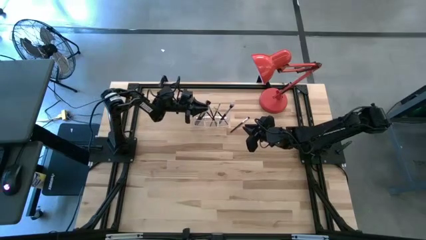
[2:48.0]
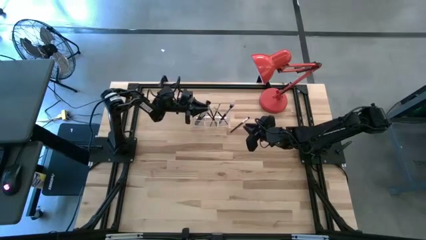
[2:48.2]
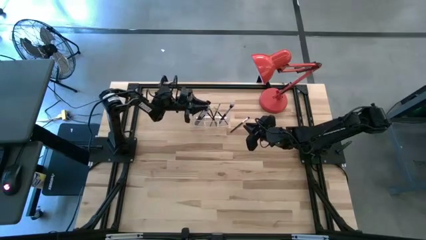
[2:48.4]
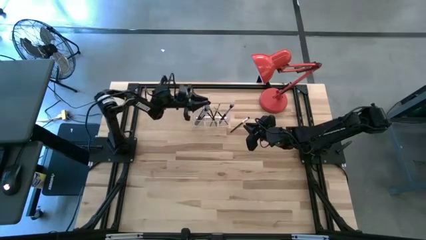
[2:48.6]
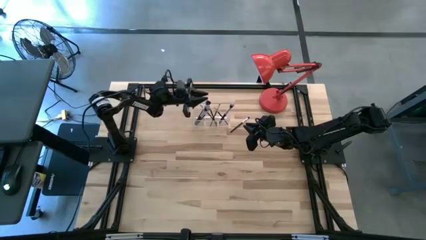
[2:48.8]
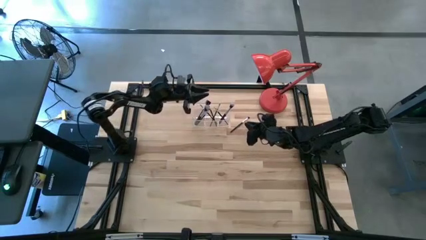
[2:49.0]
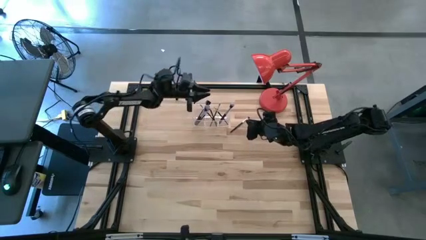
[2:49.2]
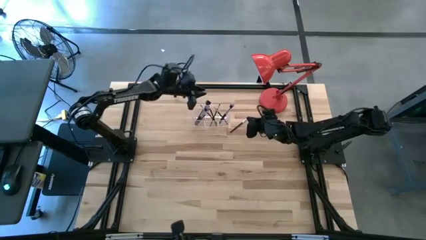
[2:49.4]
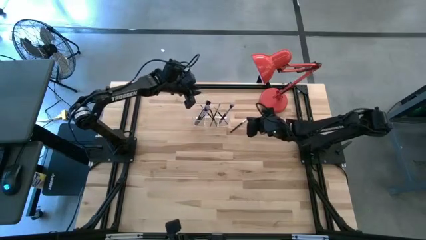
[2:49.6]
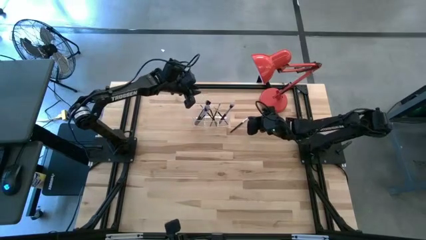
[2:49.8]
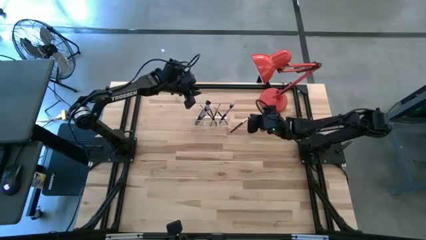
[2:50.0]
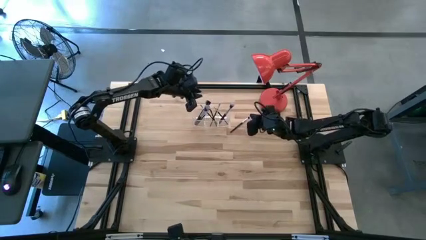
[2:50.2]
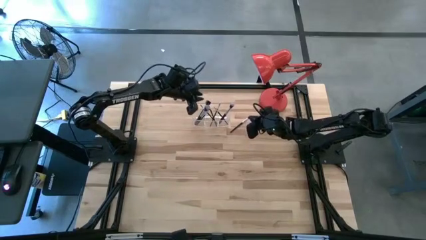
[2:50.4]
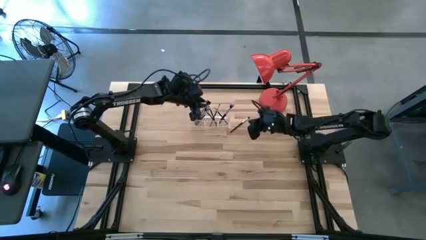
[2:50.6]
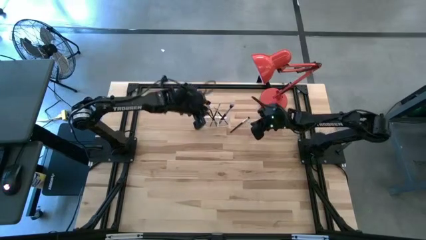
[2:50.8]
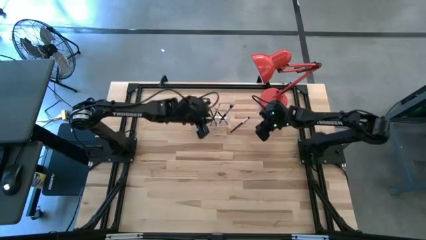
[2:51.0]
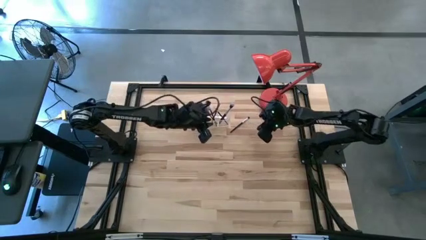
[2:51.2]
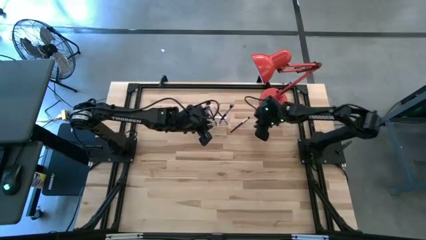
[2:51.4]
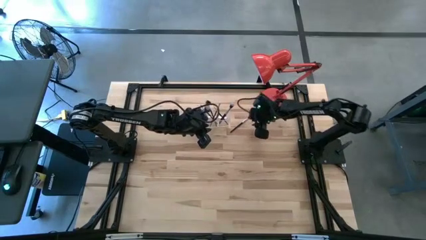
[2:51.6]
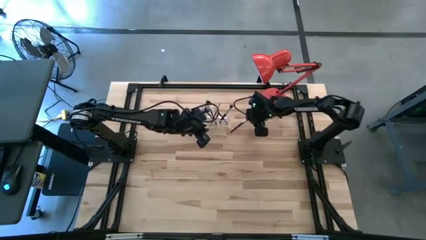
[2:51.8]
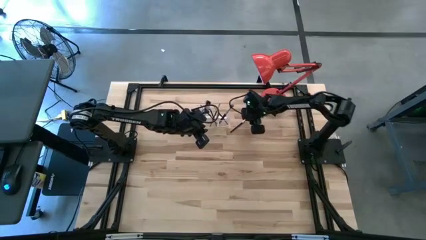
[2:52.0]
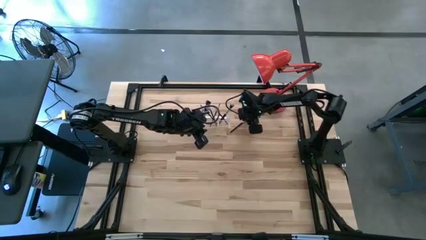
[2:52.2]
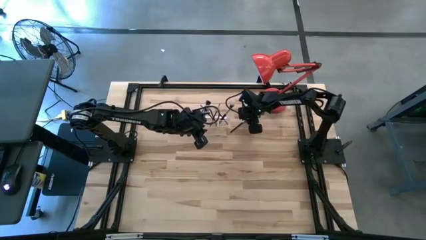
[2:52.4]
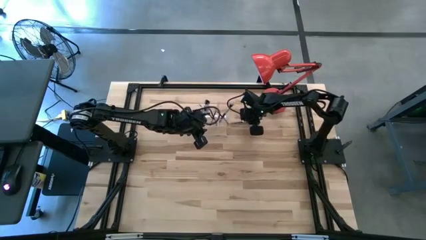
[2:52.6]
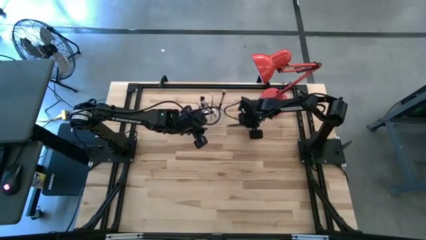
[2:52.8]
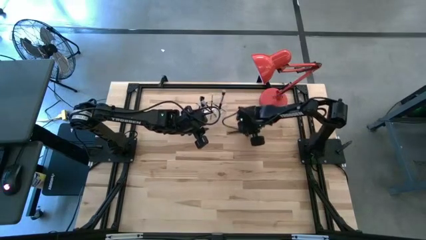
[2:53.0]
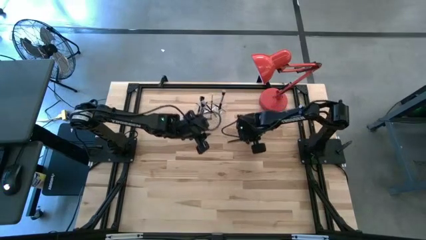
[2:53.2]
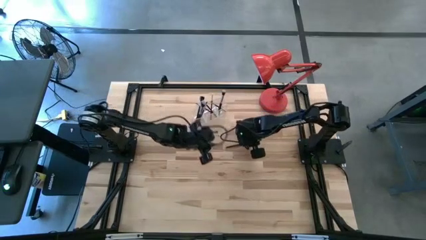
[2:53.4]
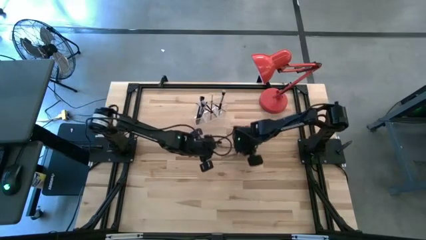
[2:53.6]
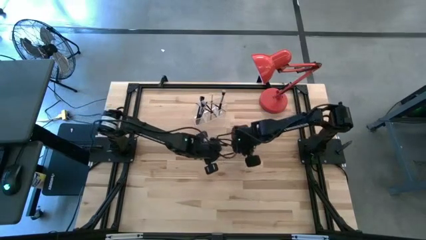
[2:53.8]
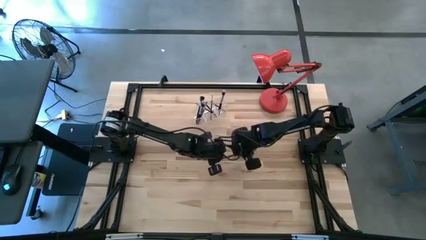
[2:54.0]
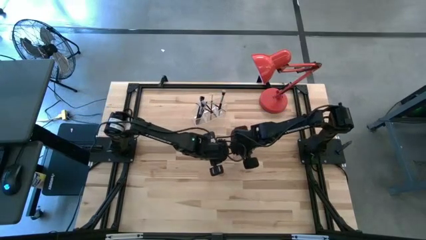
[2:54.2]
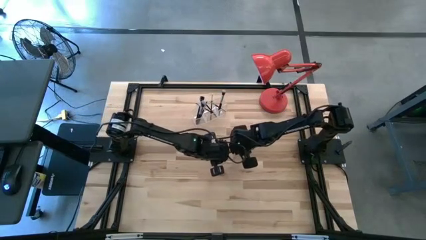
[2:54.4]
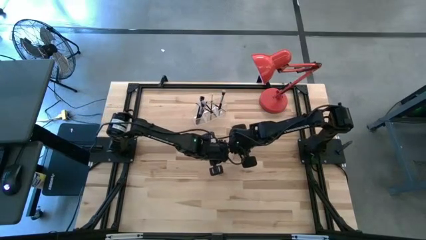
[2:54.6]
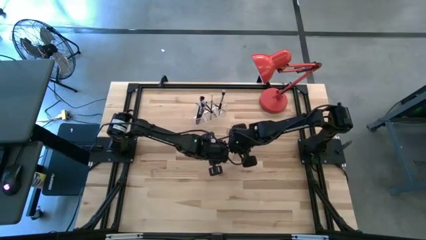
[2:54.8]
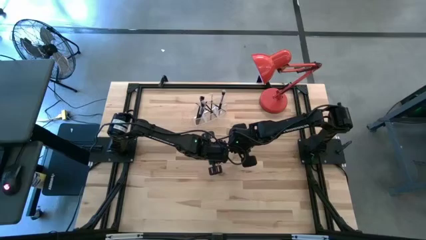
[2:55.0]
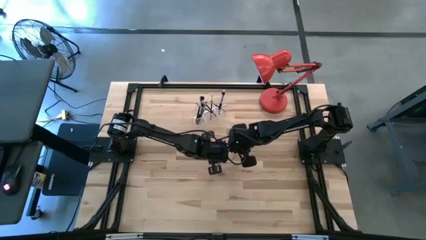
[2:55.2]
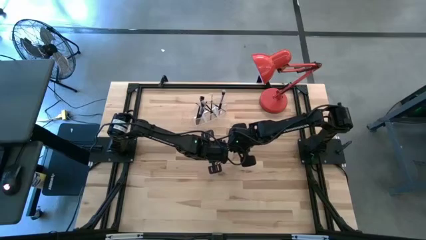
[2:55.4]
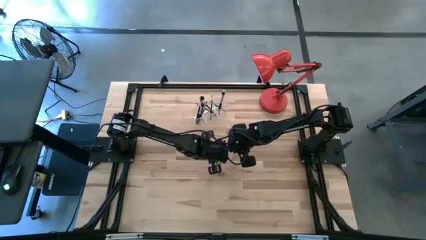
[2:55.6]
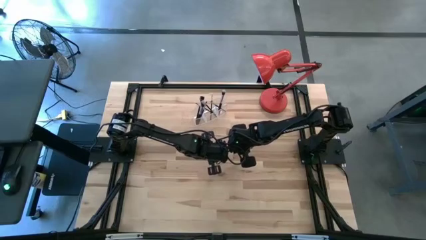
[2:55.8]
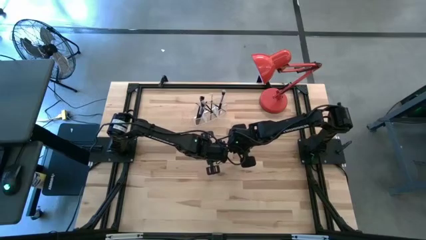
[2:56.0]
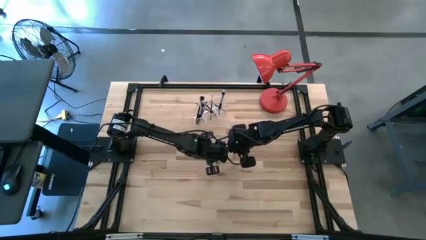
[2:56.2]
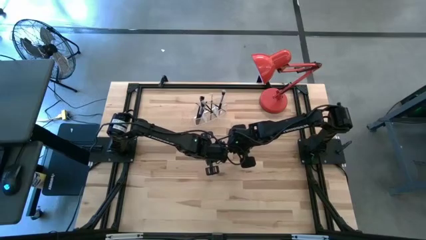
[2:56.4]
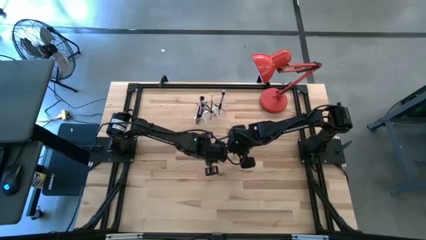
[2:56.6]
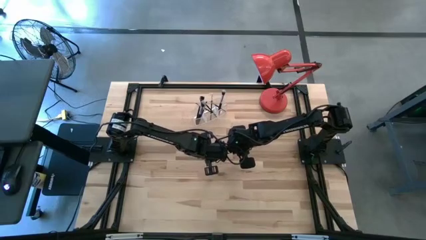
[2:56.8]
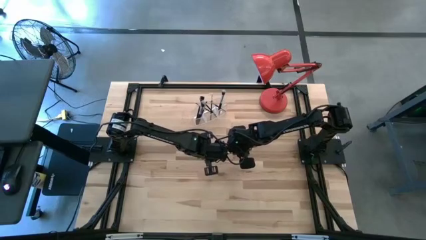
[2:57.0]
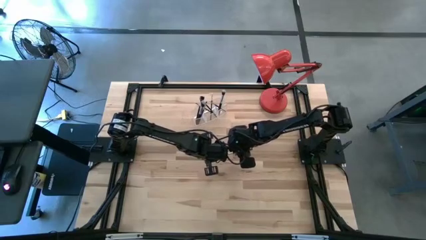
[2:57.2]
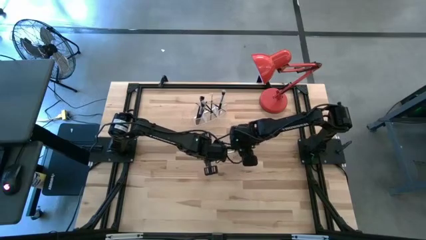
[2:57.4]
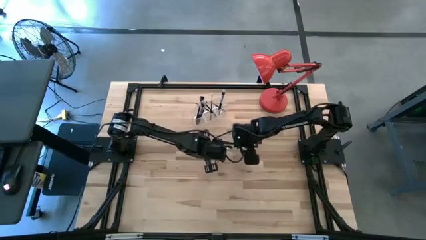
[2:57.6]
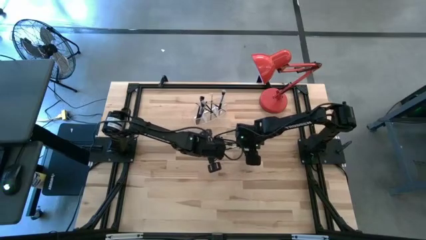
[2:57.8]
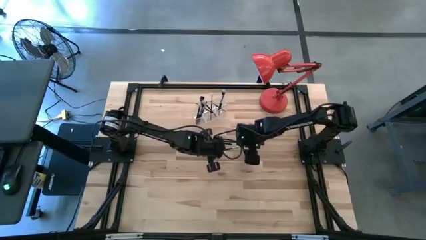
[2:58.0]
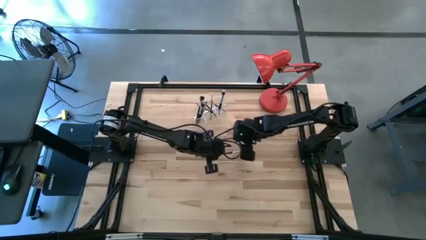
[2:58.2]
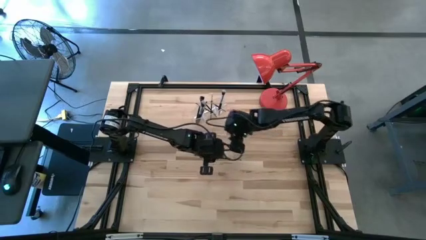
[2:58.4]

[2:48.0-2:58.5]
Task: Put items in baskets/containers
Put the black foundation brush into the transparent organizer

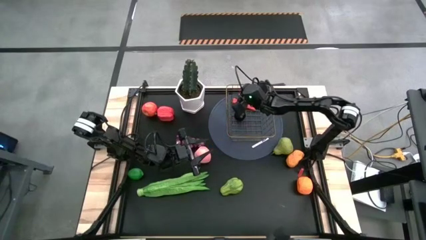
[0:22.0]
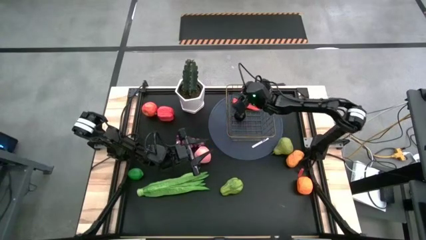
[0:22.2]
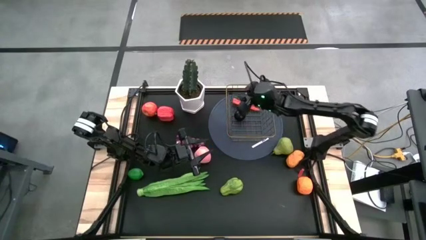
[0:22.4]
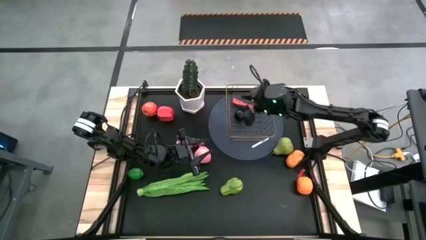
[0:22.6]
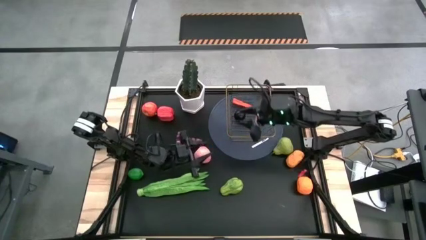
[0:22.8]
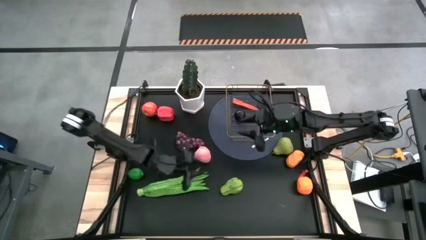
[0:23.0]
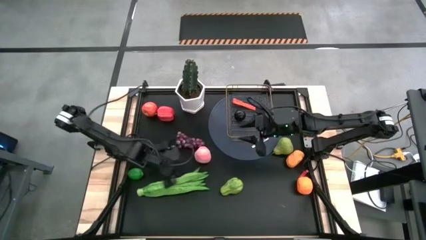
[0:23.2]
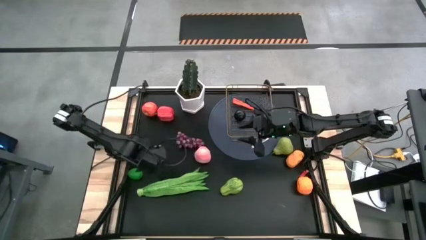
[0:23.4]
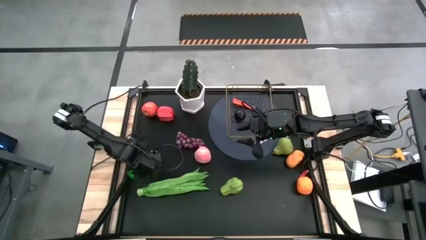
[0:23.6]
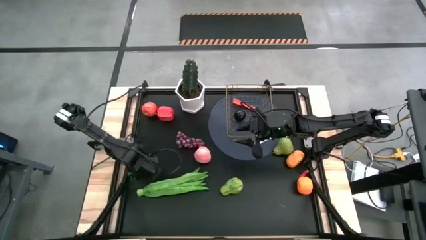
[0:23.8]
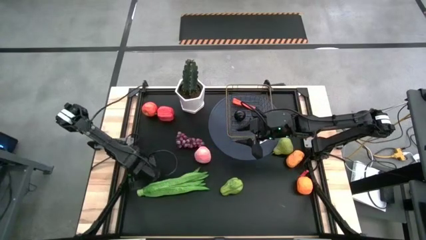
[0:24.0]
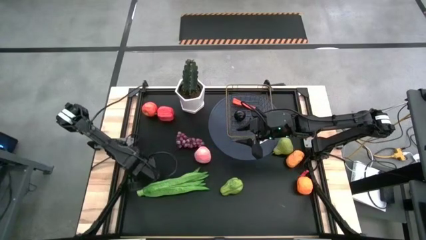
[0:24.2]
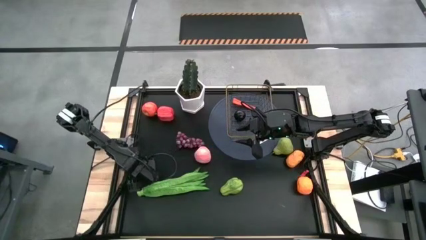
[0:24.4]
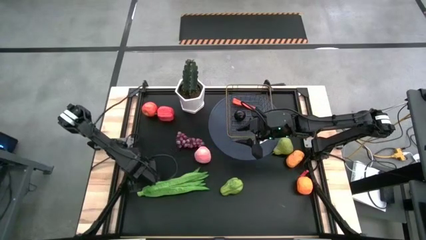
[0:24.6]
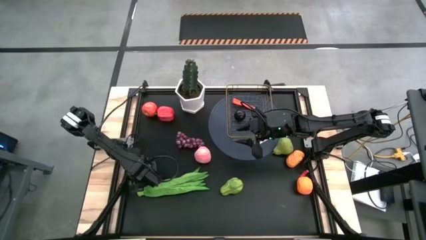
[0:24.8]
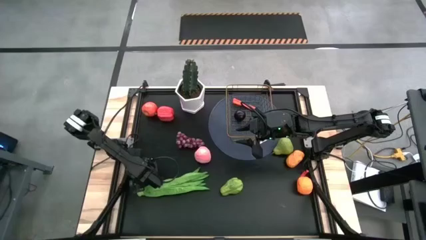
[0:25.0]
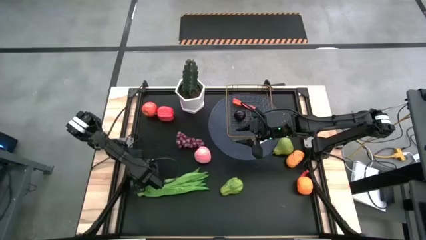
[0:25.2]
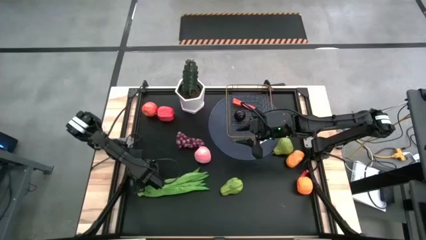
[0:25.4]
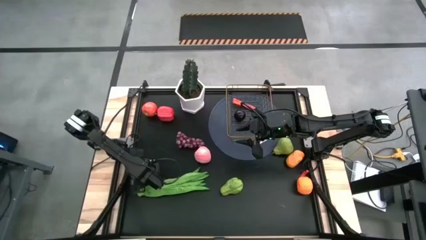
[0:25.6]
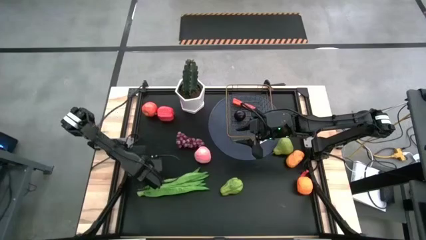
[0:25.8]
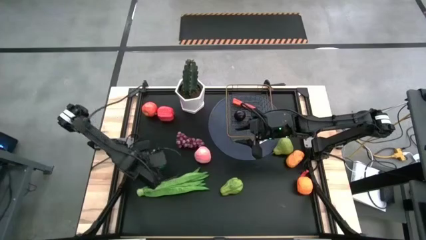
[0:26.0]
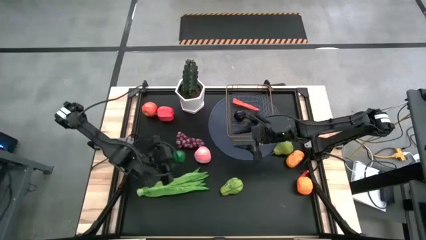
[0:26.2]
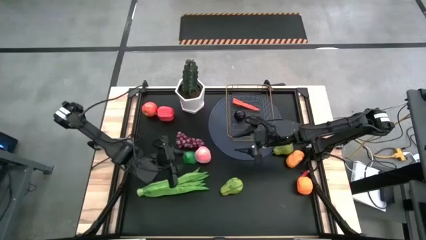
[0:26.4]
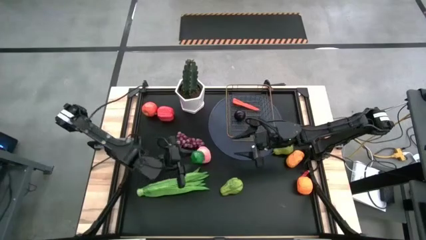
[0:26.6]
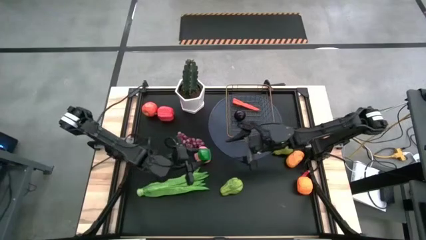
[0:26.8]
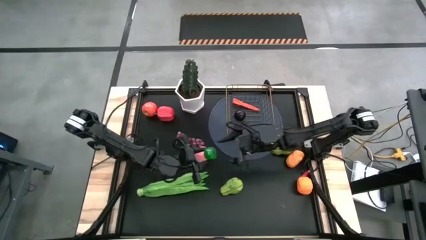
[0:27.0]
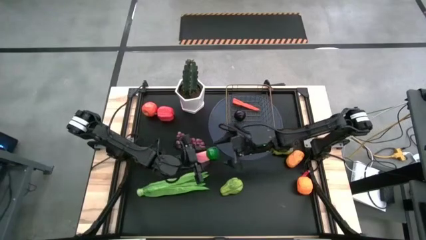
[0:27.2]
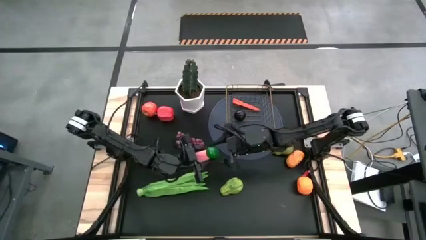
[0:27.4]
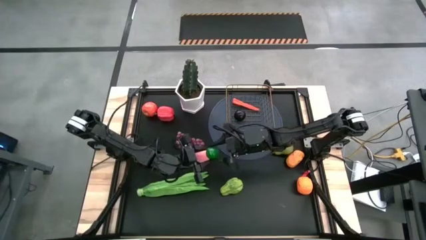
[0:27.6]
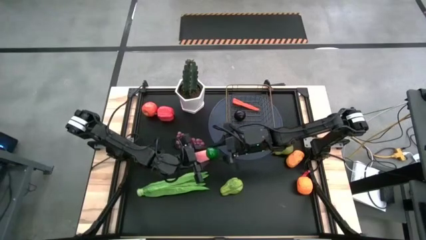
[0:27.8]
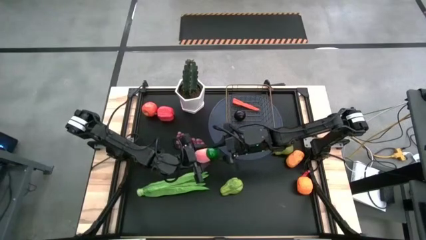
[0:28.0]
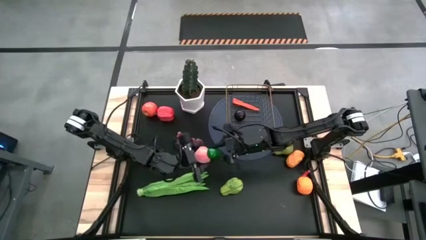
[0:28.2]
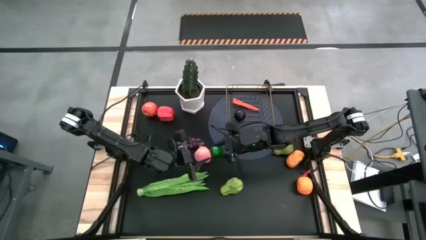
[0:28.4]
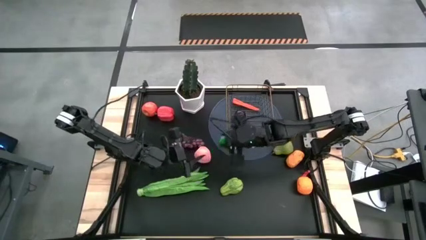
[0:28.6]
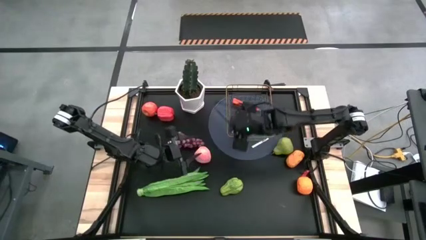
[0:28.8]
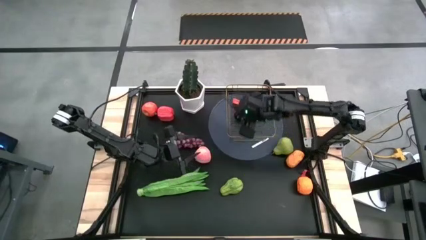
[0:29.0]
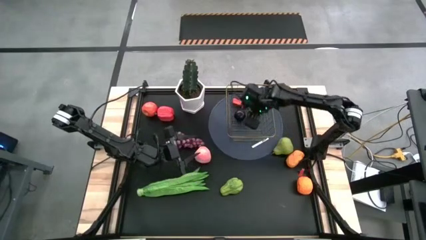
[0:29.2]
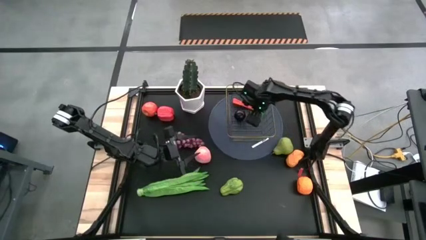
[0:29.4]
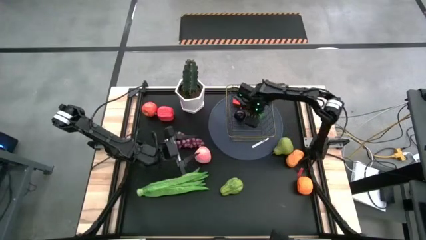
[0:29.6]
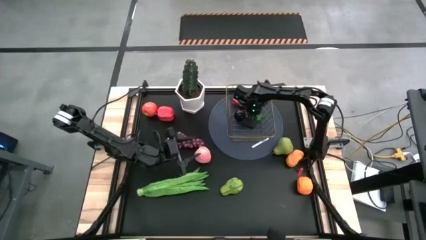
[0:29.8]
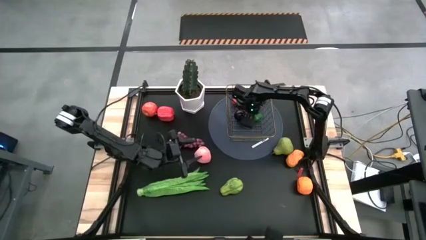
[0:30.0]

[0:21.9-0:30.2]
Task: Build produce basket
Put the green lime into the gold wire basket
